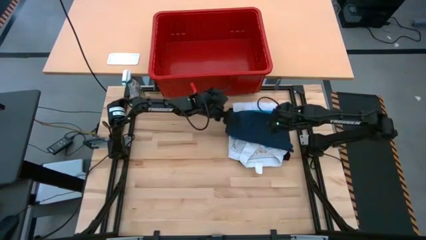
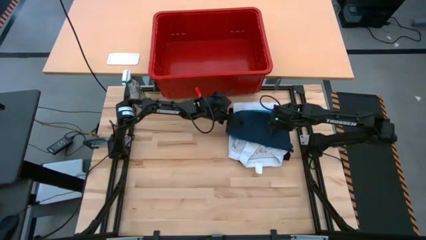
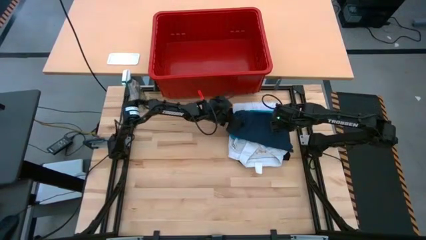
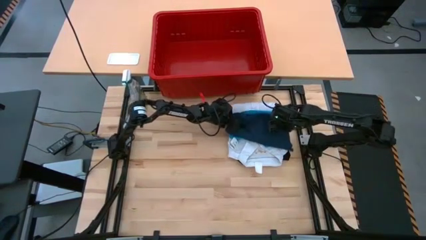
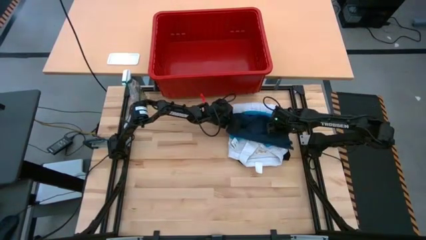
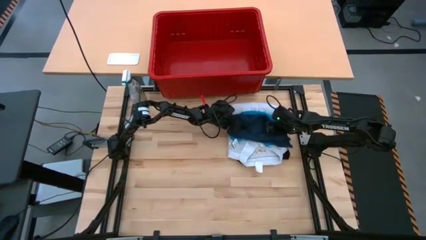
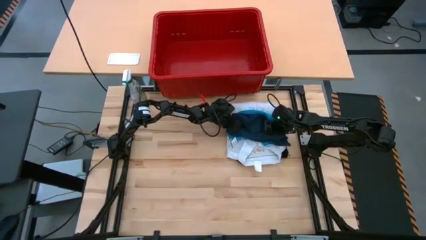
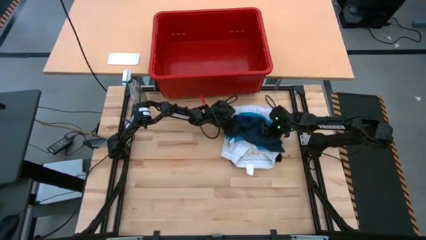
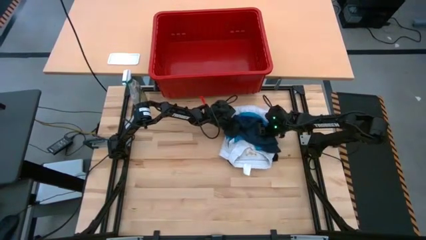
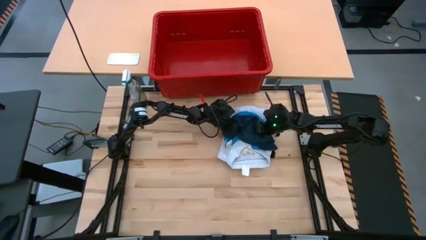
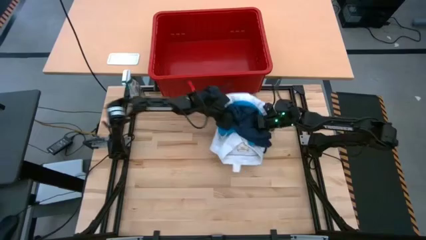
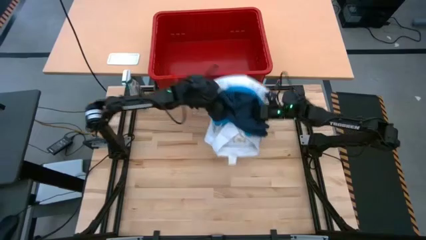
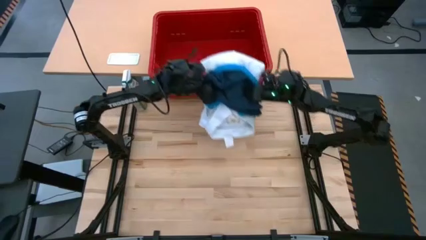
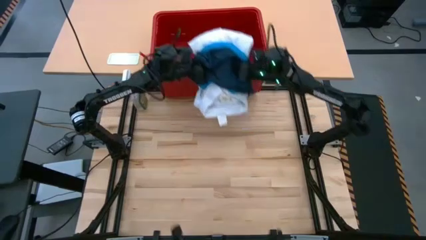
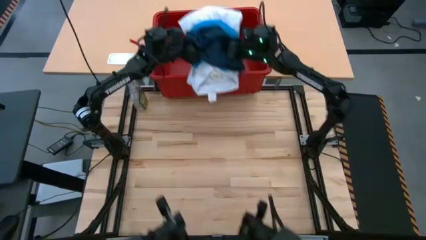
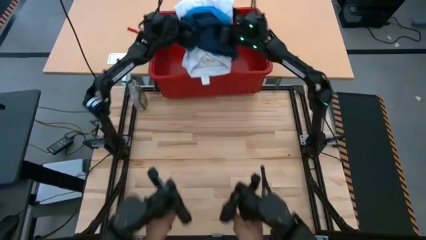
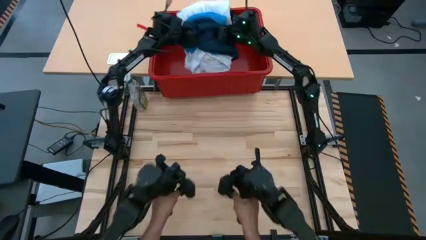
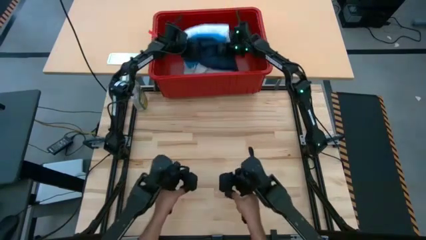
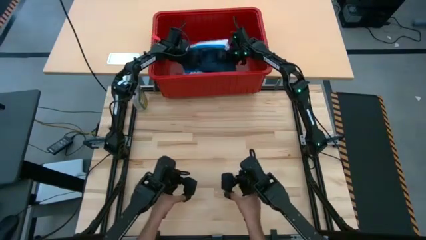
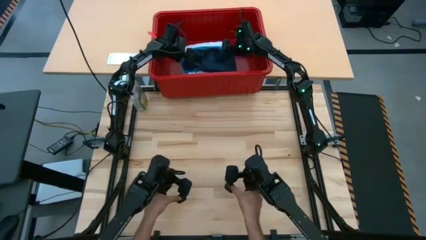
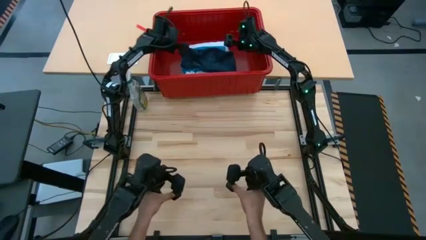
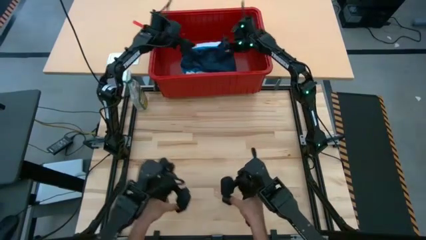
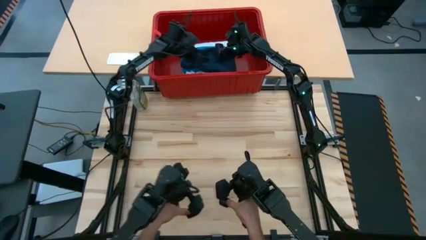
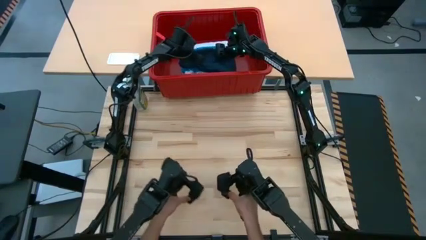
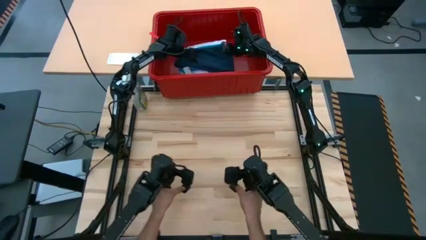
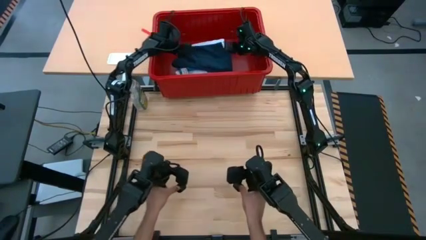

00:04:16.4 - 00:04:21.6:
Task: Fold laundry
Put the stacked folded clothes into the bin

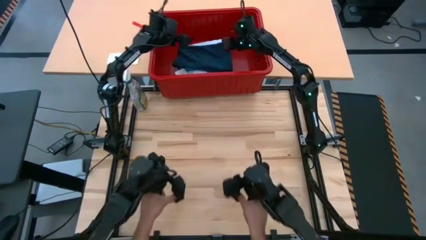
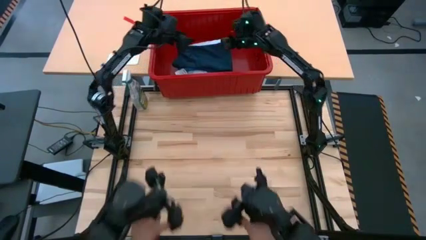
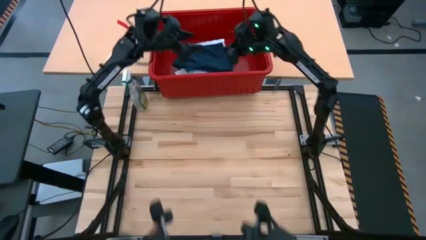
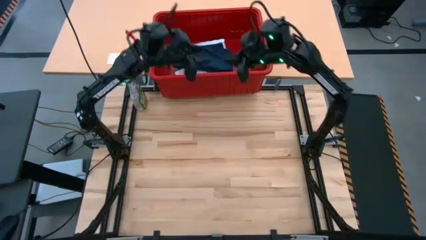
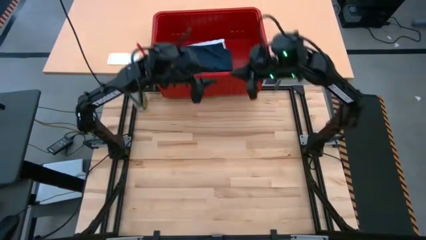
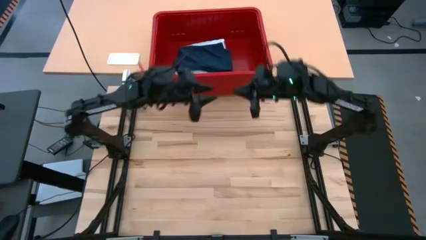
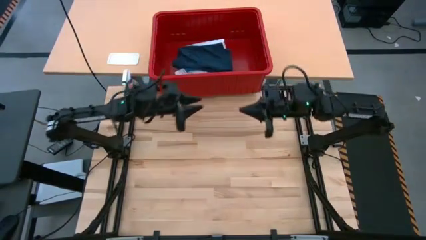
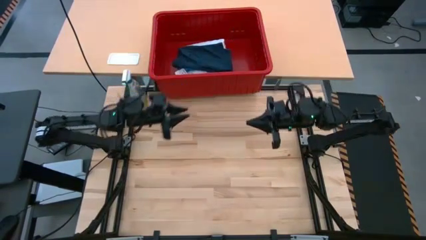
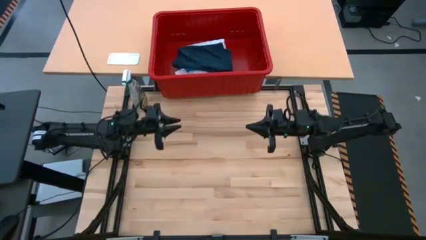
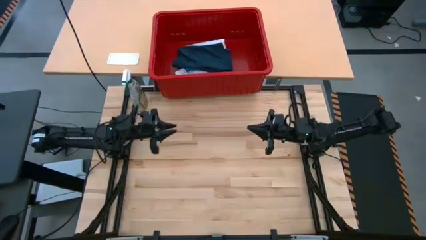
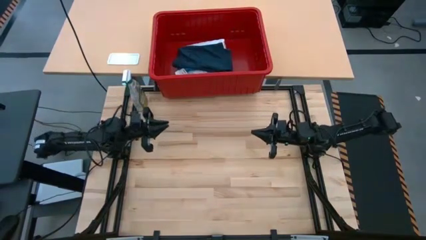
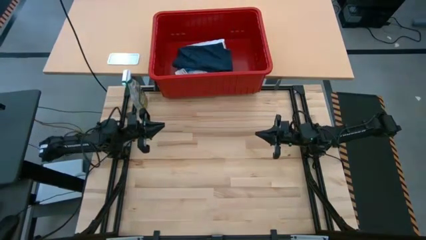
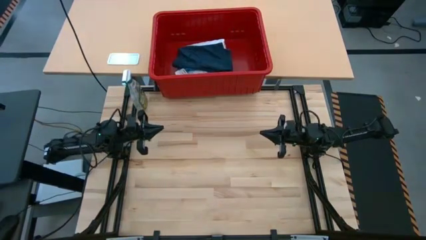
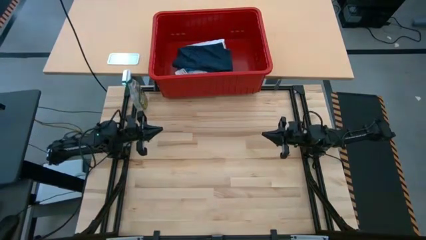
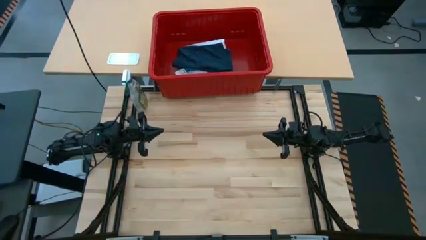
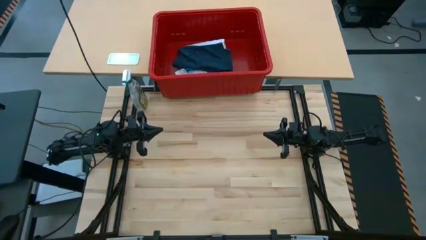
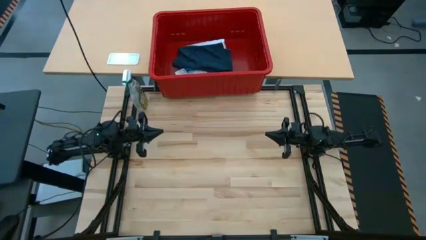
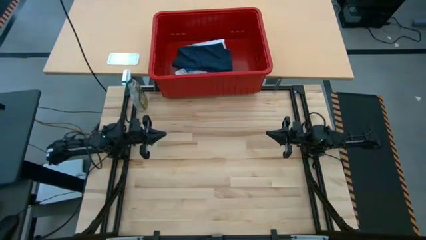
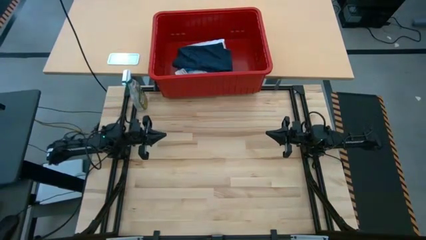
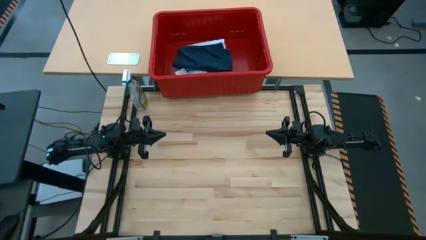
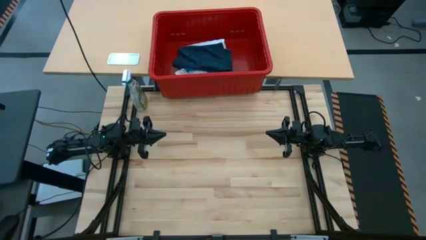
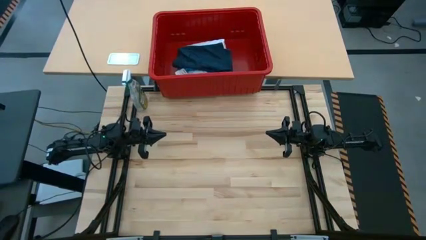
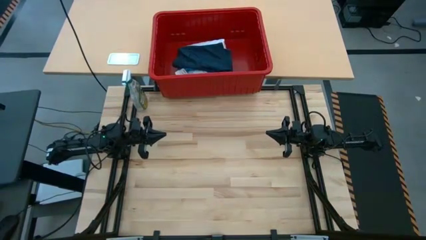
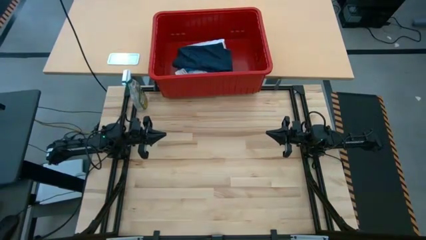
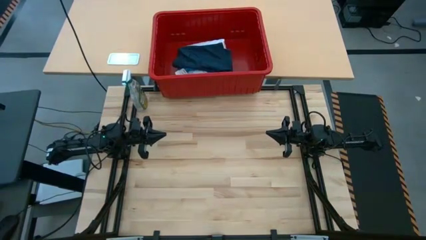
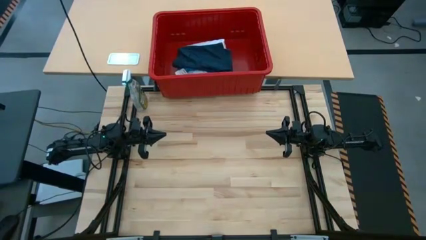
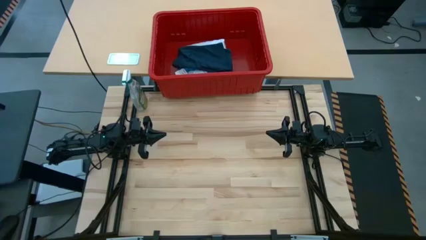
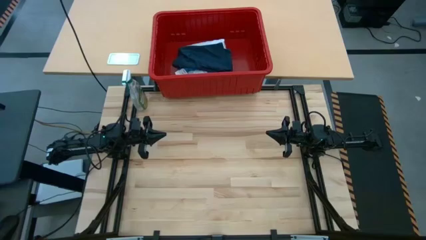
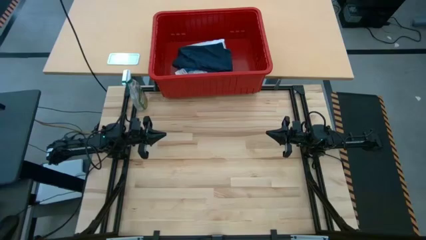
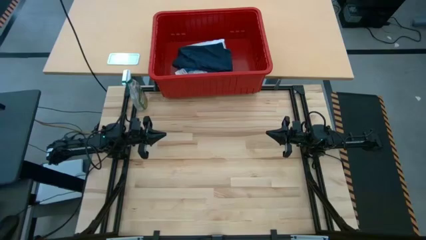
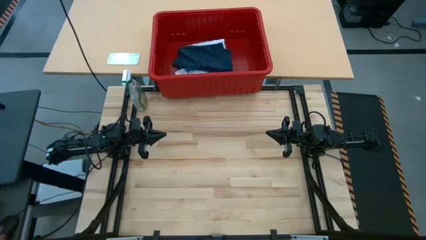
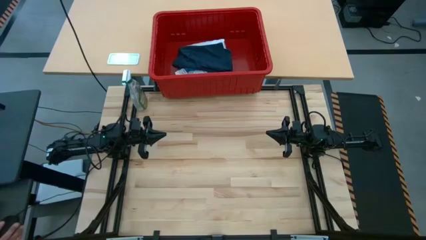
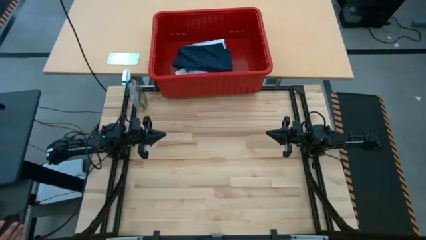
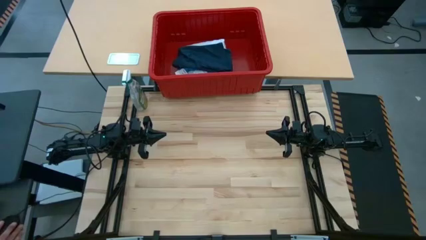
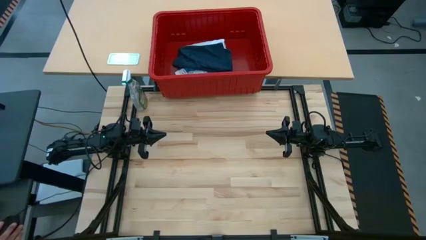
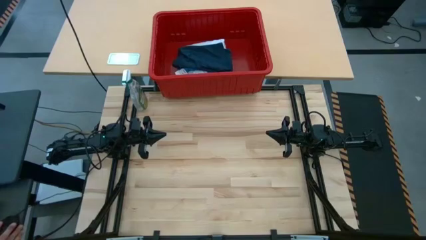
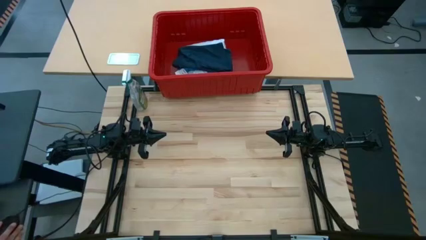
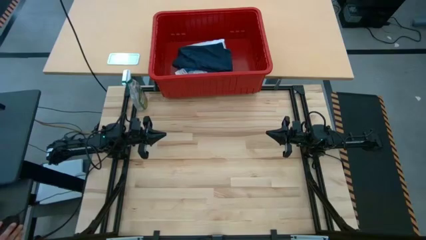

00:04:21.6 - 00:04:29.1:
Return to Home Position

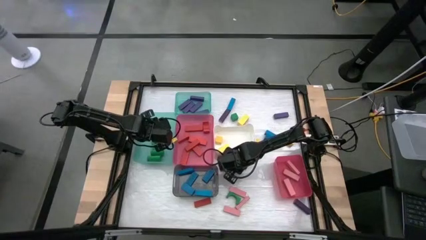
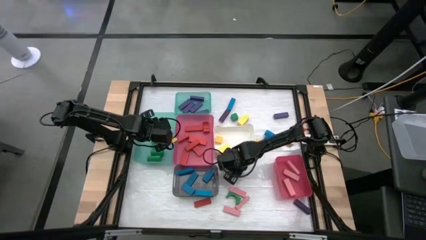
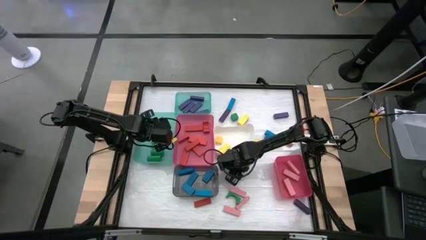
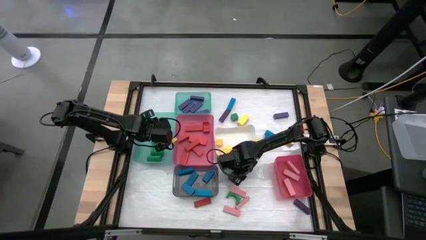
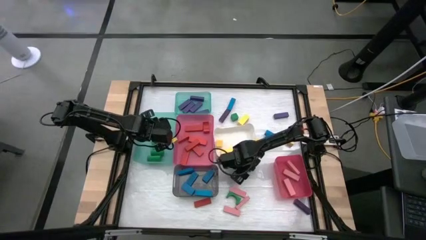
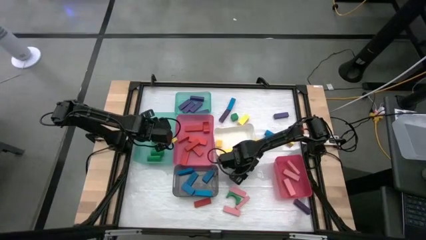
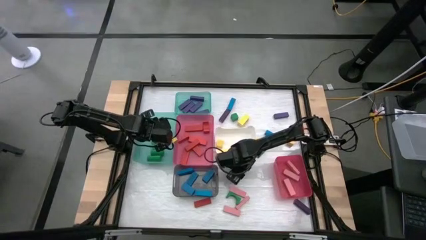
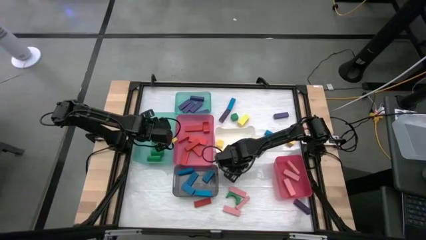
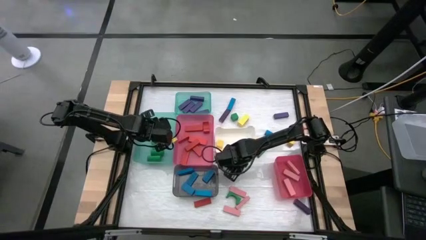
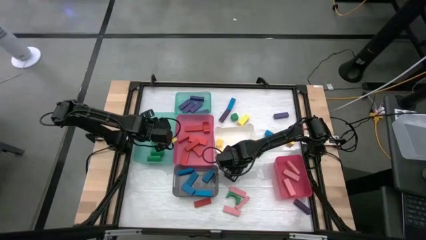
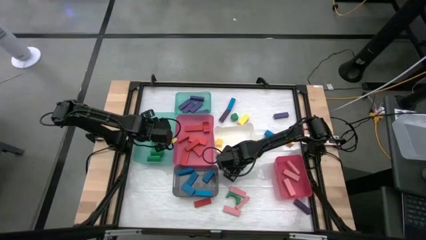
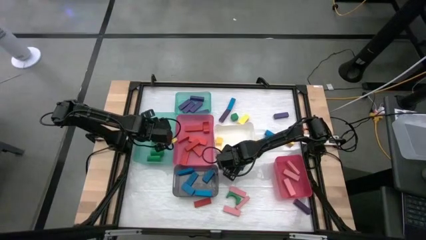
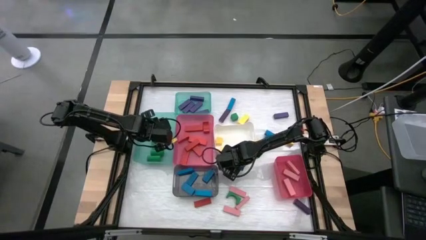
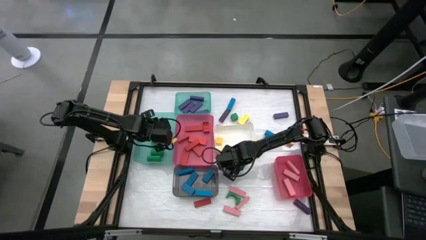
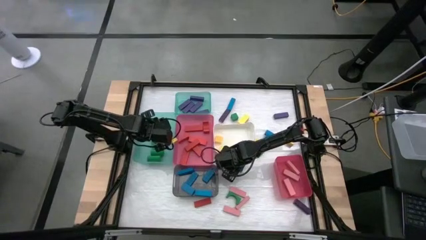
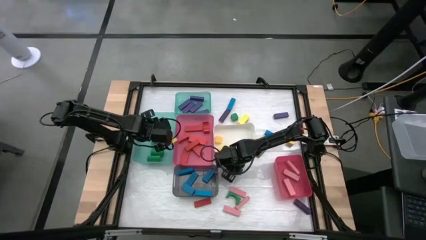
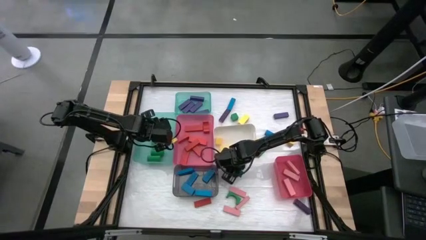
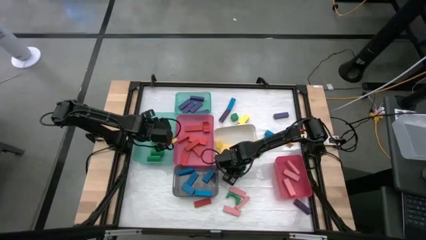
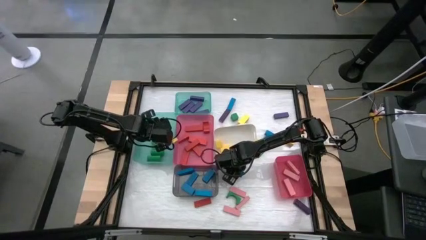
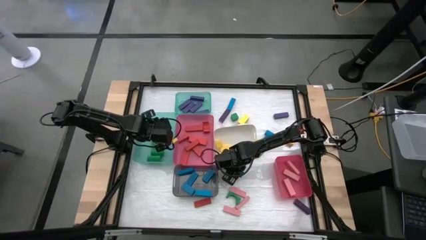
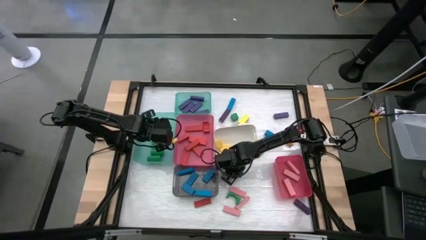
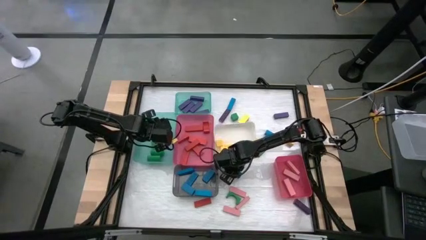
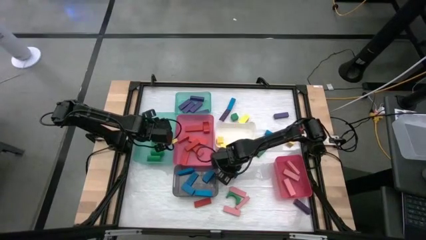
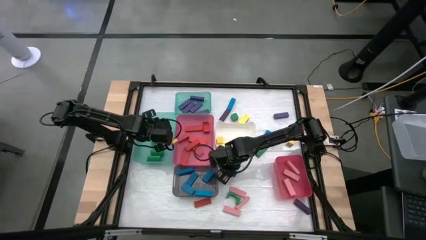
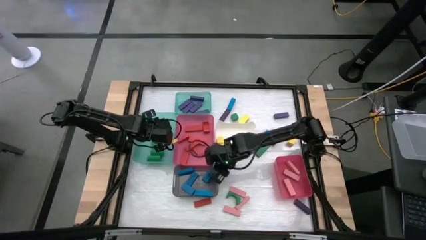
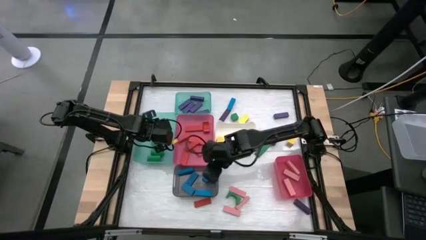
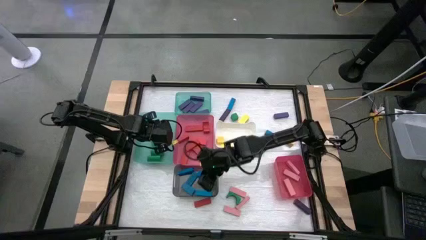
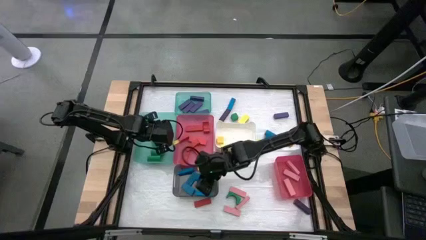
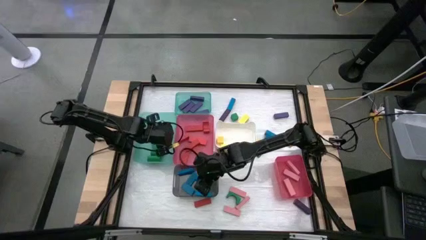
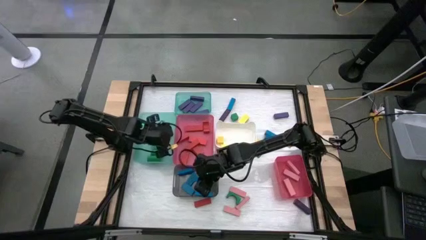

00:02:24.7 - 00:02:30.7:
Task: Sort blocks
Put the blue block into the black bin
